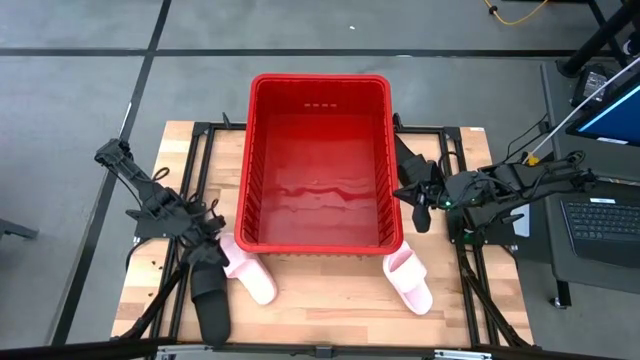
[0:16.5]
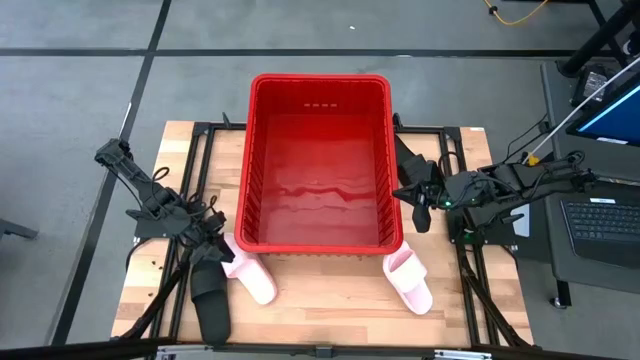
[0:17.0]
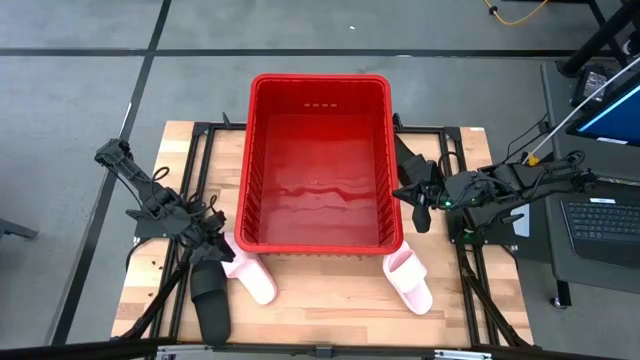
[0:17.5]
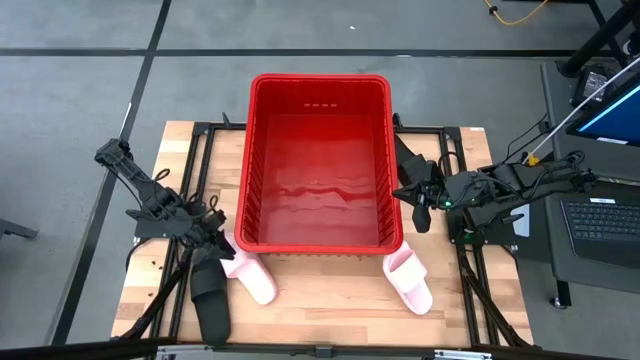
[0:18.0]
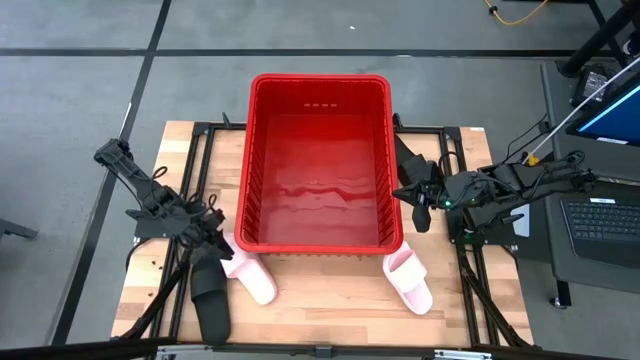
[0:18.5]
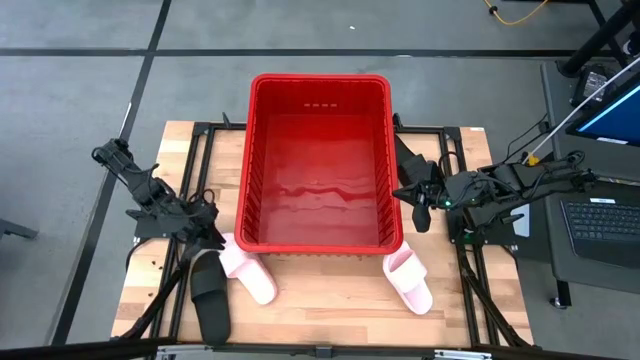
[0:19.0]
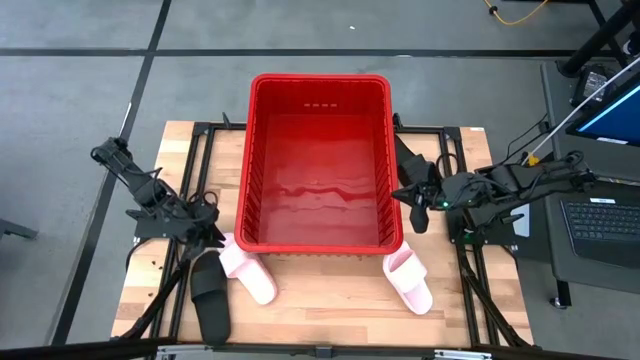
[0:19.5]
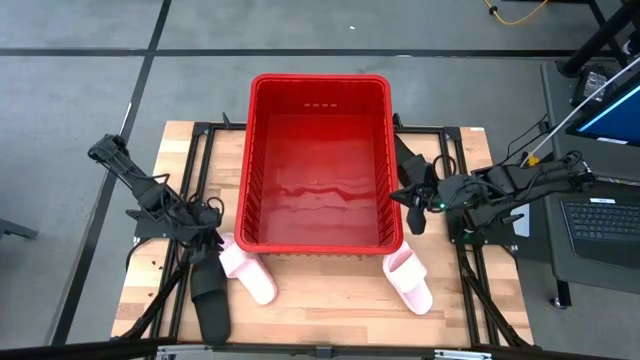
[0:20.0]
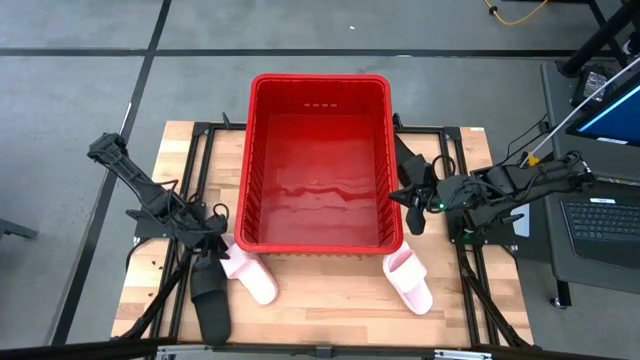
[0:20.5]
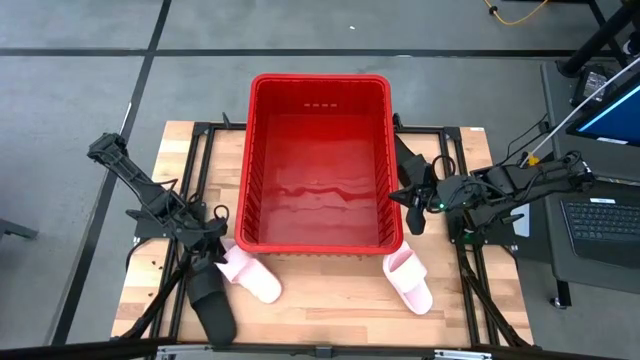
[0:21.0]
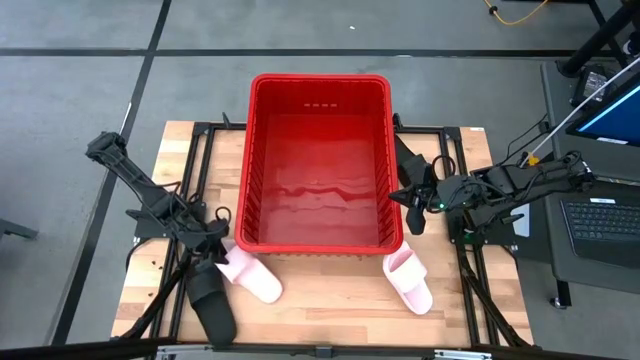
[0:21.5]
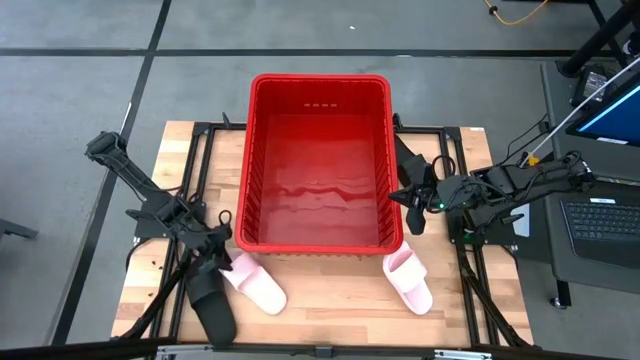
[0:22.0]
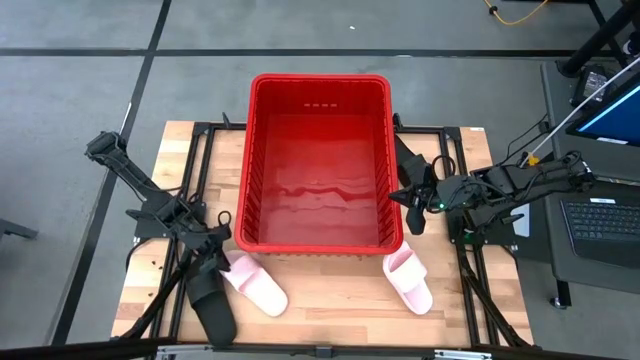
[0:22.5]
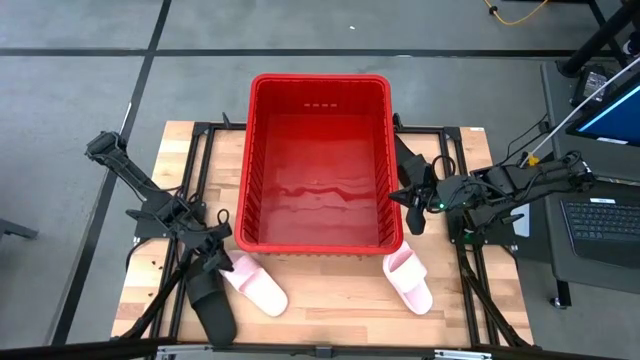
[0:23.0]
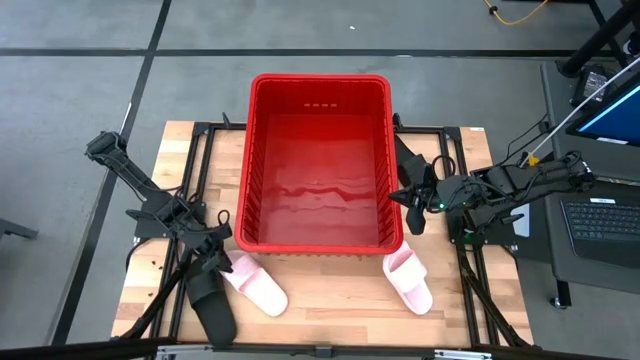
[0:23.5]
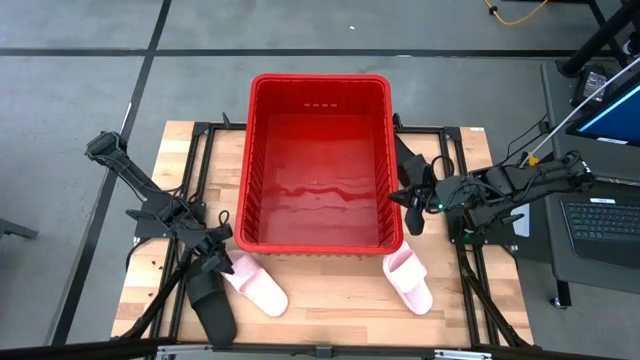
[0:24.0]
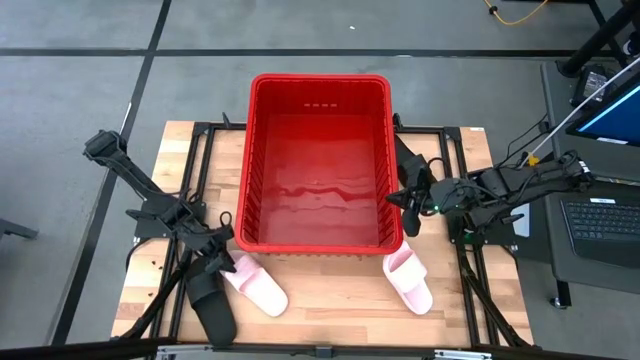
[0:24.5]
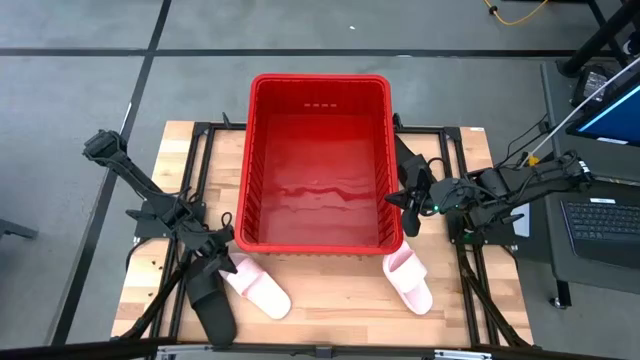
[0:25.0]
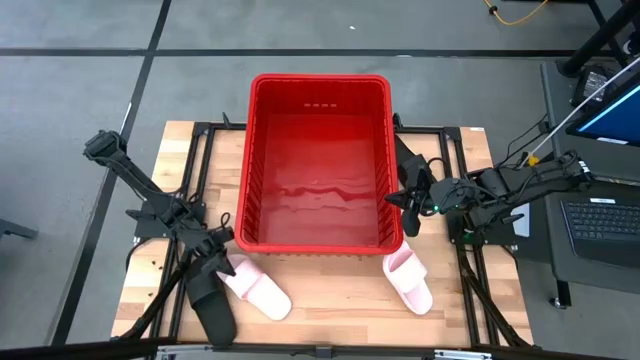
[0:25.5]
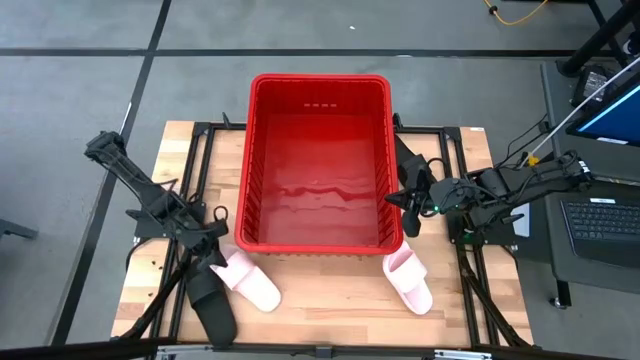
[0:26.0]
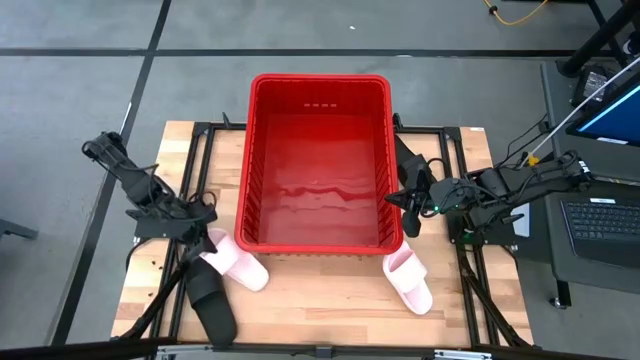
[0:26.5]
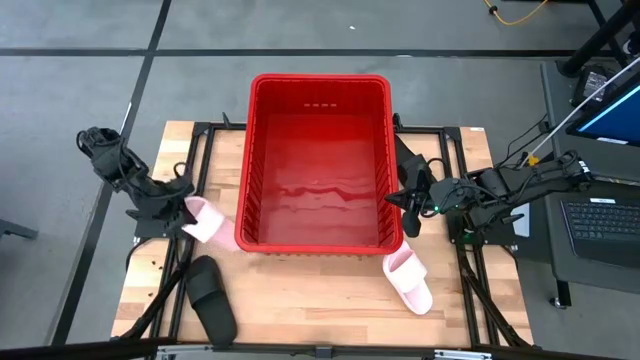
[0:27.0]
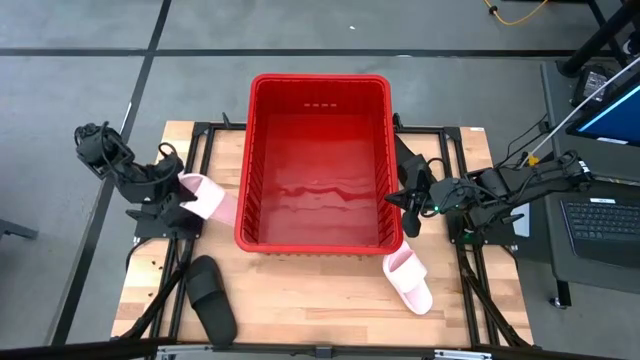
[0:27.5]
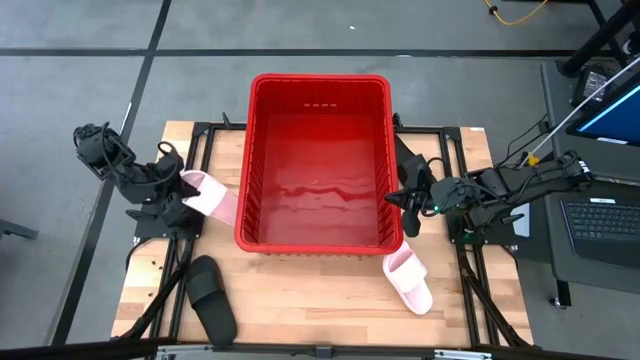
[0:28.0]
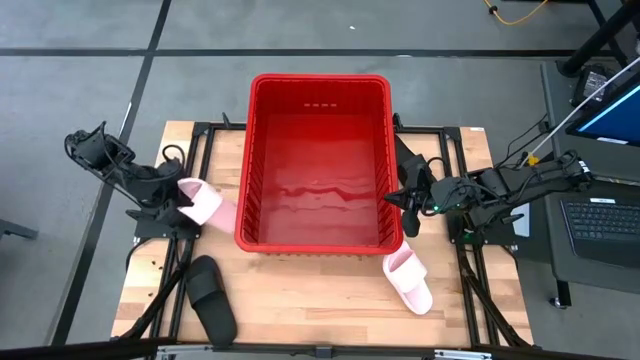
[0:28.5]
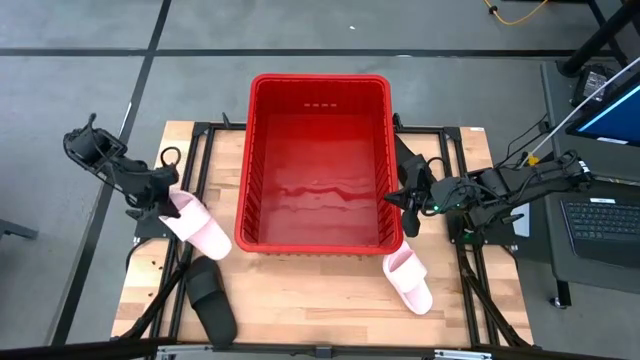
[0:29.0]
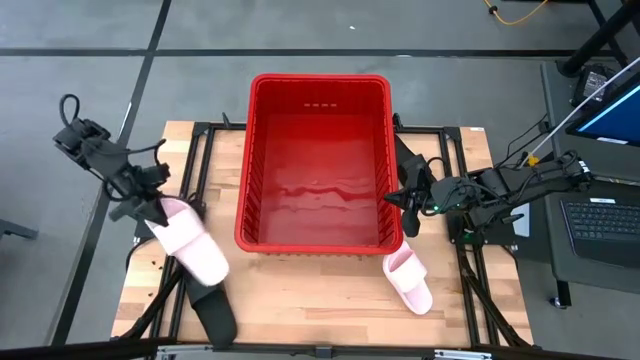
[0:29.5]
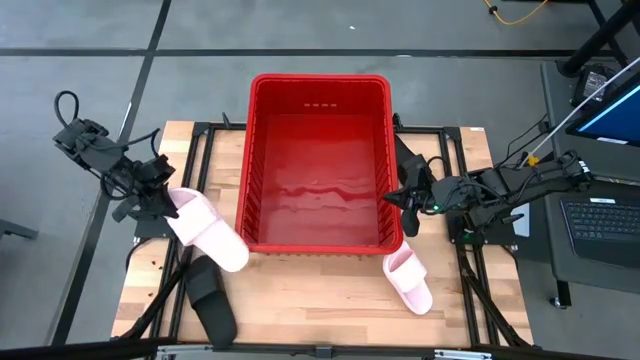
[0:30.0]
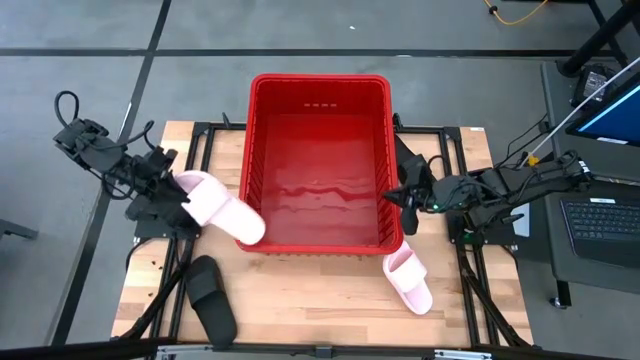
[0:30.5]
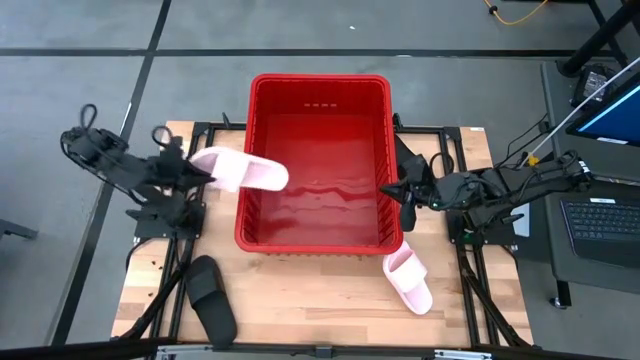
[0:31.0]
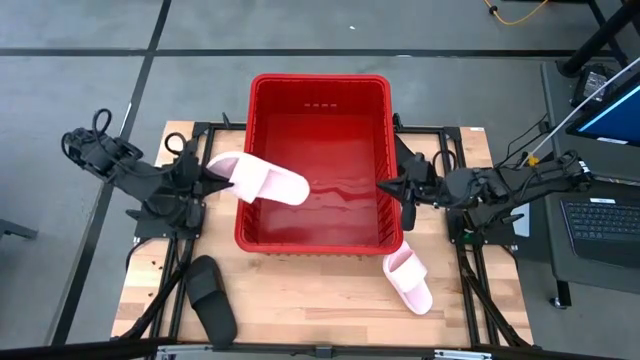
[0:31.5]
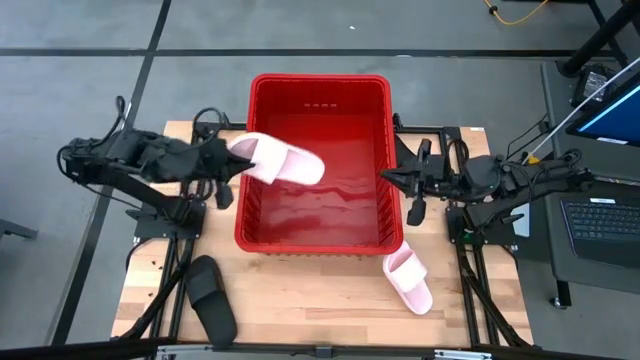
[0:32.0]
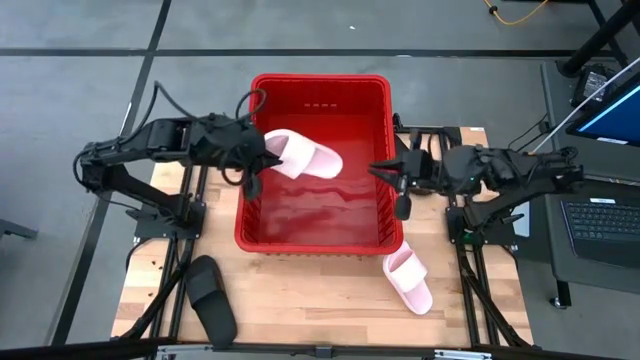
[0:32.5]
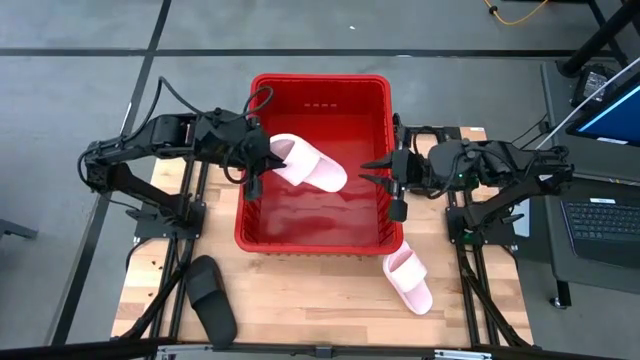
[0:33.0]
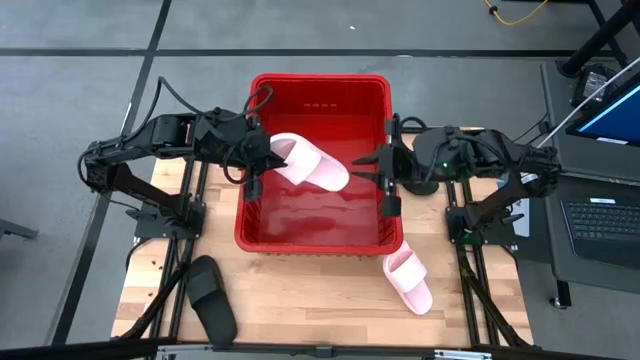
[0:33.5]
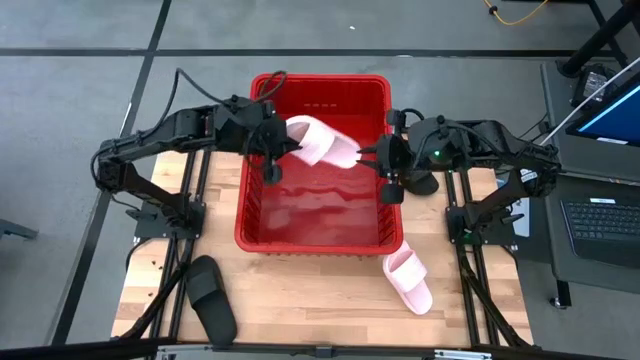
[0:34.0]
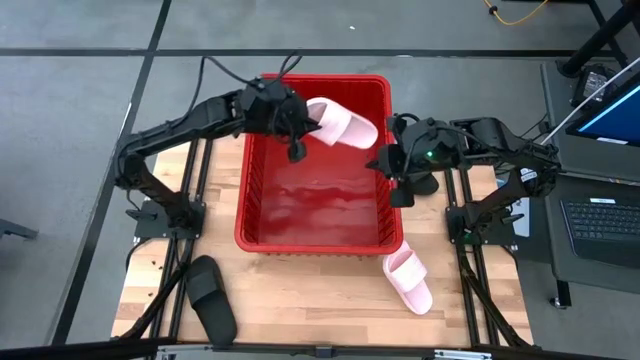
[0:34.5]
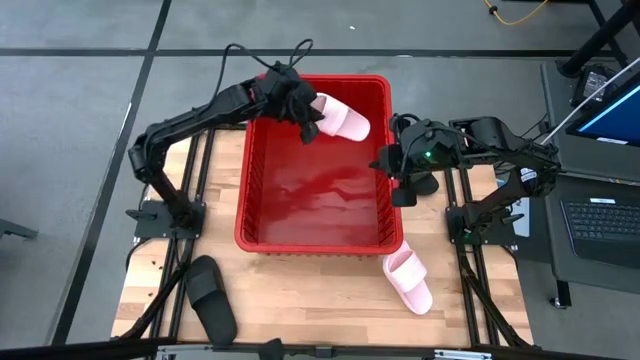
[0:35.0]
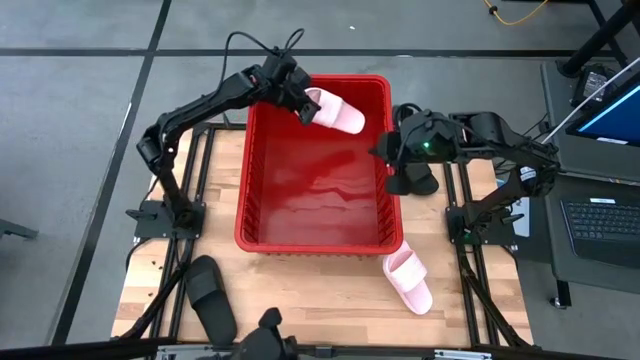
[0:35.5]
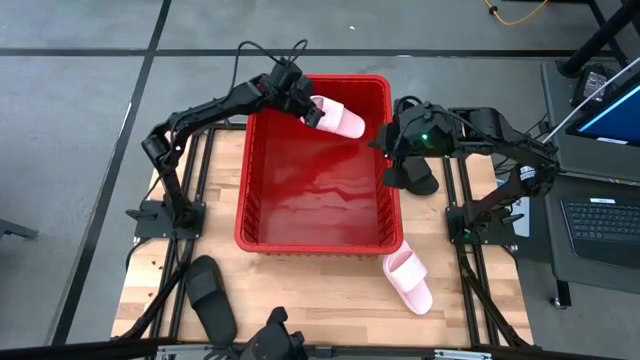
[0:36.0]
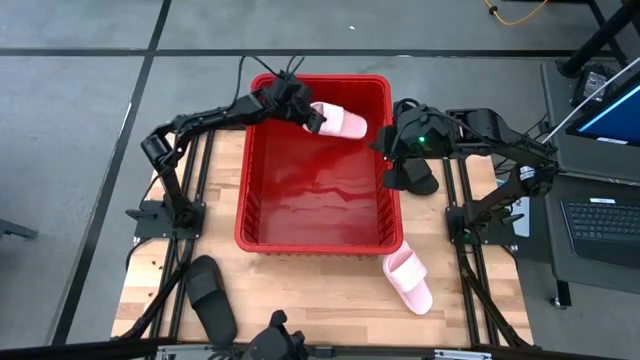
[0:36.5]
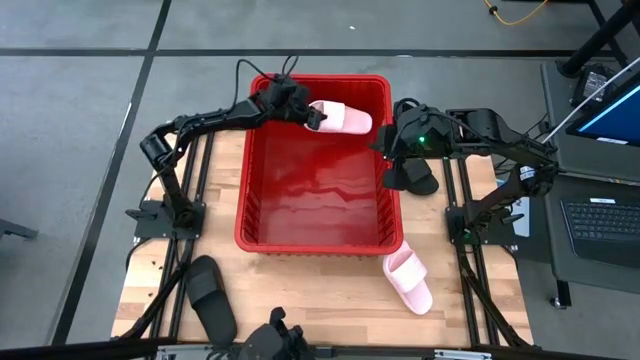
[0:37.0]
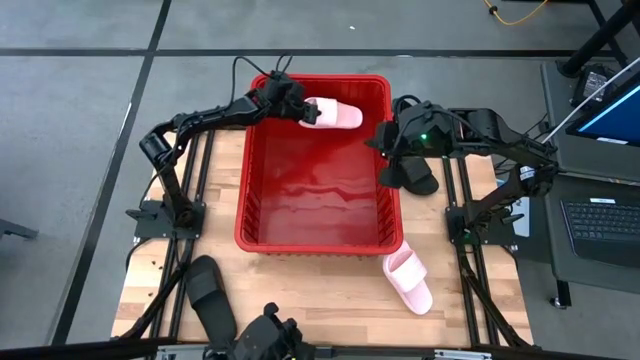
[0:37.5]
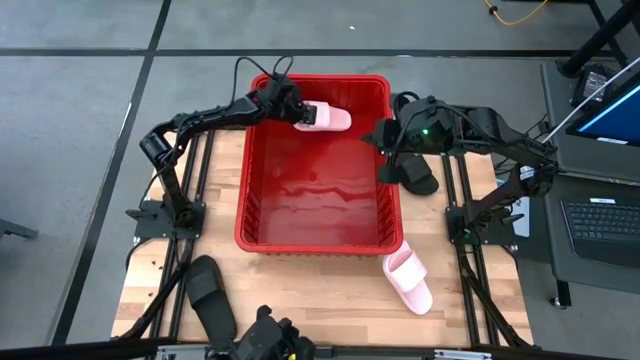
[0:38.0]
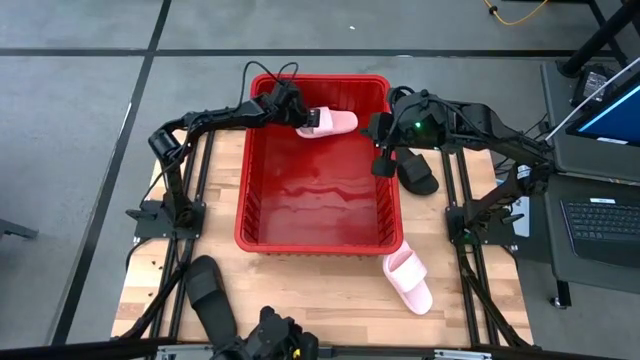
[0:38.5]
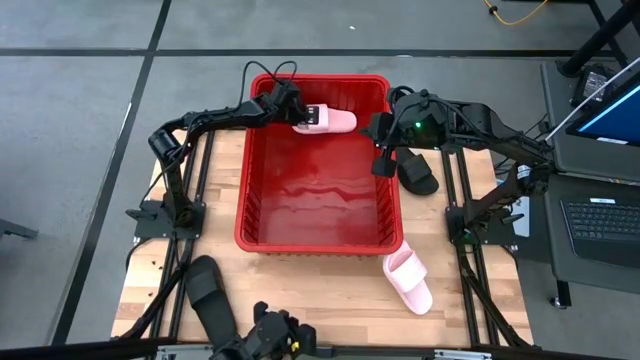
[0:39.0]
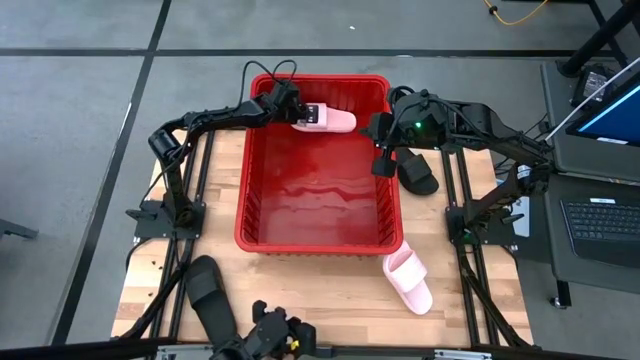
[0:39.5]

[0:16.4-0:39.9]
Task: Pick and place slides into bin
Put the left pink slide into the bin
